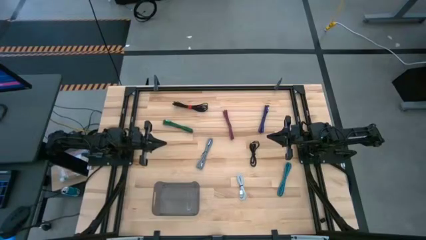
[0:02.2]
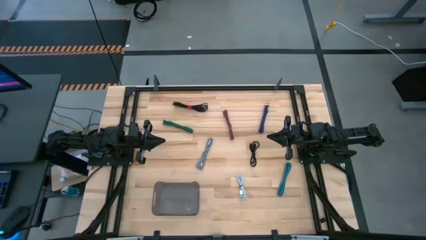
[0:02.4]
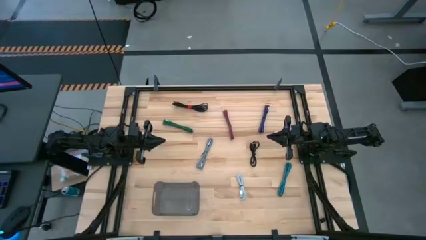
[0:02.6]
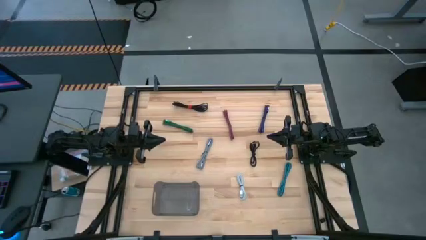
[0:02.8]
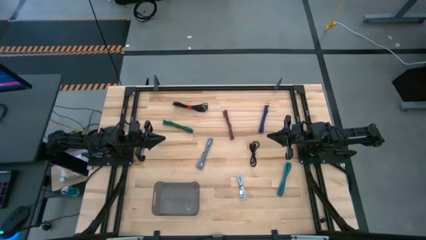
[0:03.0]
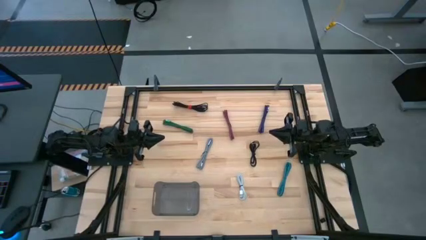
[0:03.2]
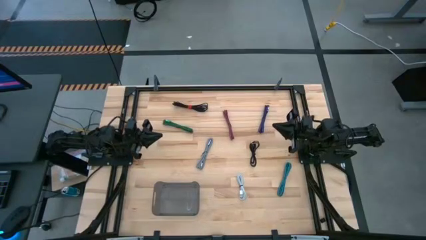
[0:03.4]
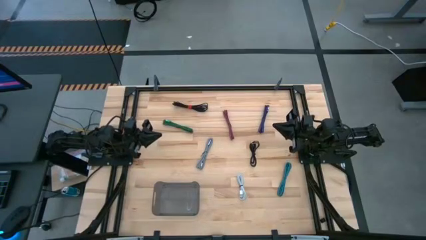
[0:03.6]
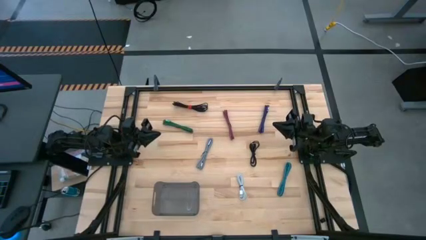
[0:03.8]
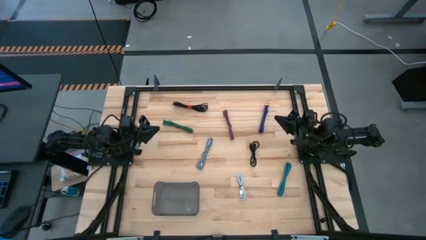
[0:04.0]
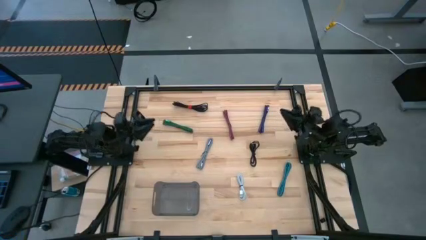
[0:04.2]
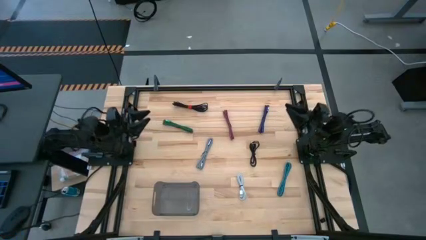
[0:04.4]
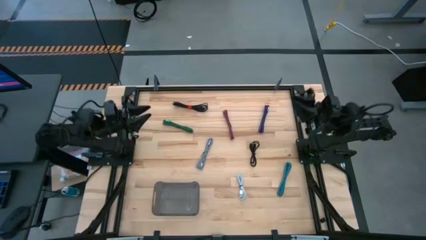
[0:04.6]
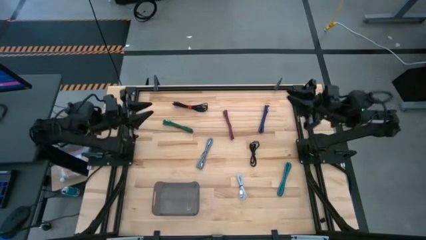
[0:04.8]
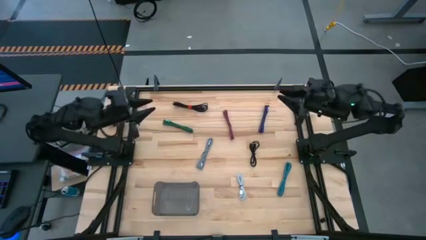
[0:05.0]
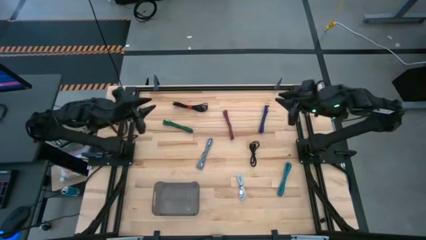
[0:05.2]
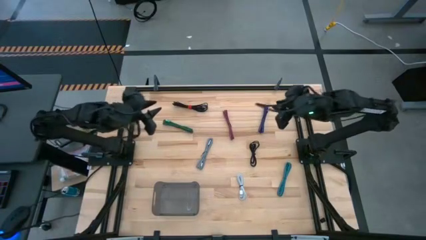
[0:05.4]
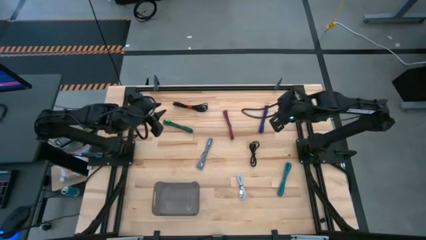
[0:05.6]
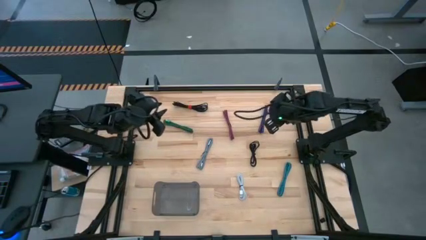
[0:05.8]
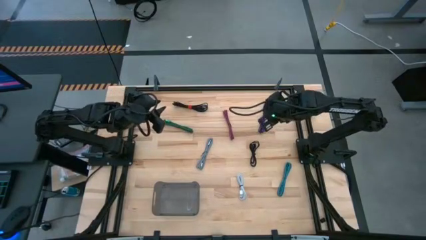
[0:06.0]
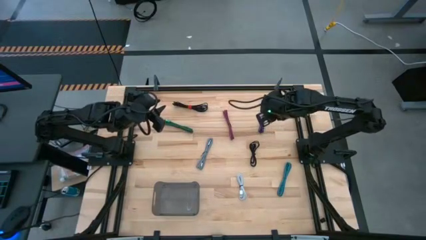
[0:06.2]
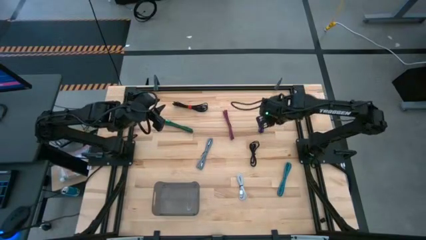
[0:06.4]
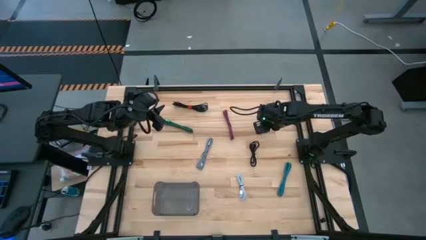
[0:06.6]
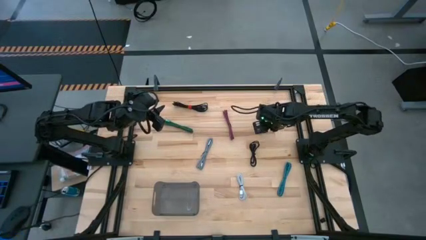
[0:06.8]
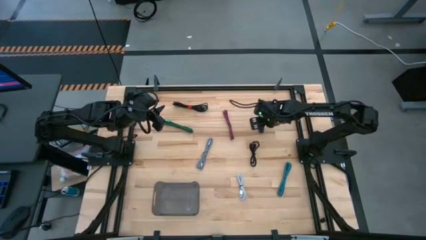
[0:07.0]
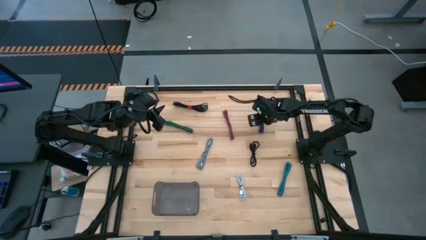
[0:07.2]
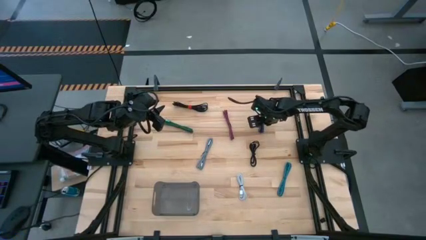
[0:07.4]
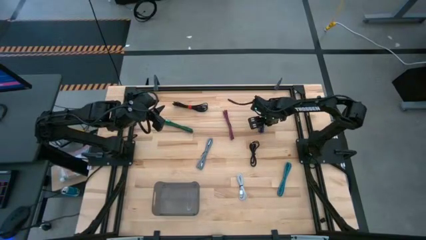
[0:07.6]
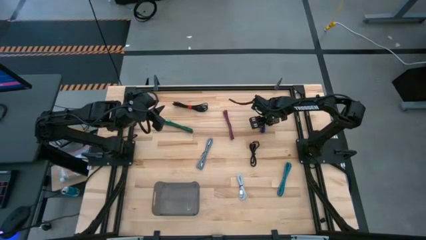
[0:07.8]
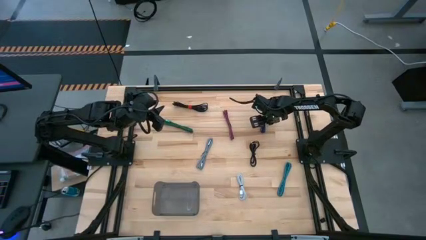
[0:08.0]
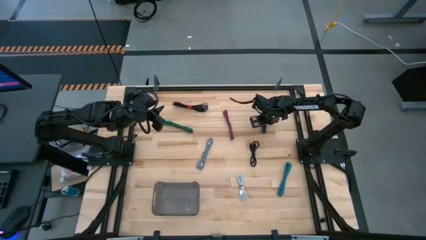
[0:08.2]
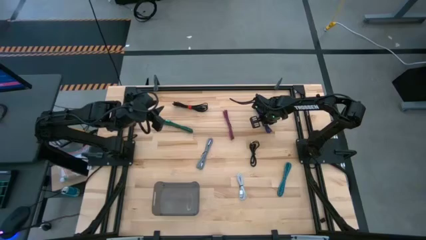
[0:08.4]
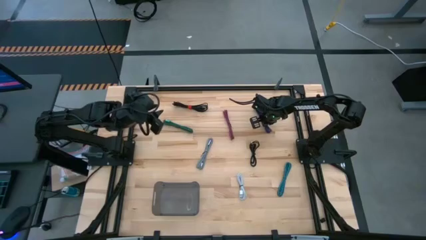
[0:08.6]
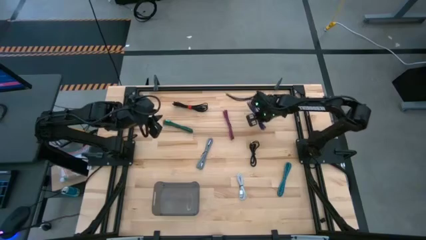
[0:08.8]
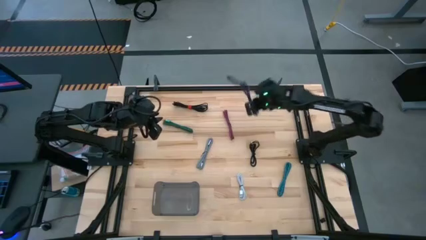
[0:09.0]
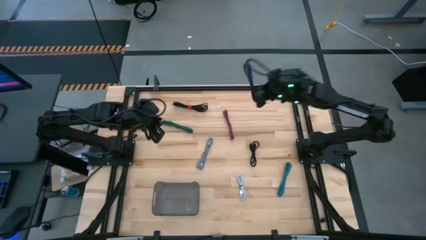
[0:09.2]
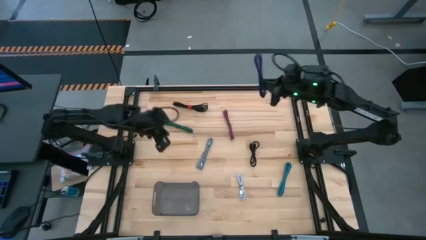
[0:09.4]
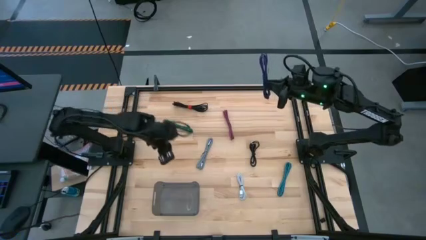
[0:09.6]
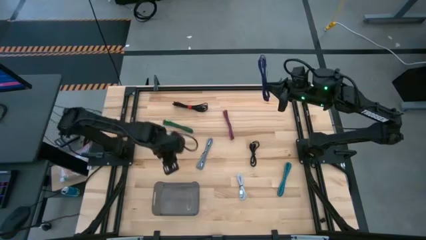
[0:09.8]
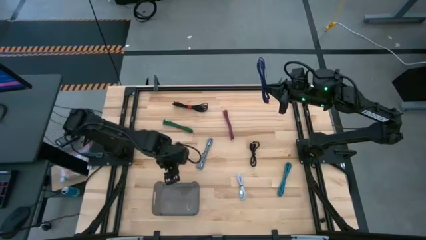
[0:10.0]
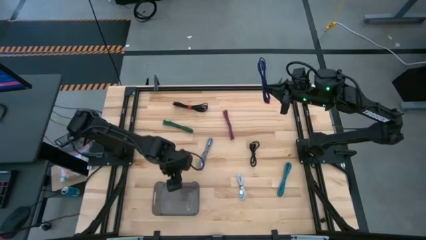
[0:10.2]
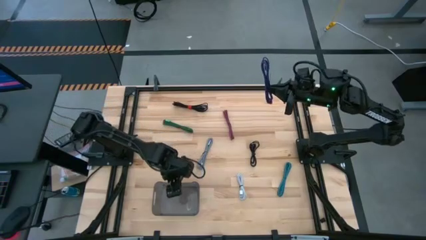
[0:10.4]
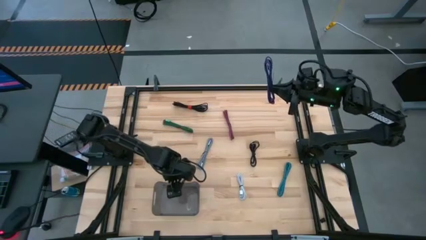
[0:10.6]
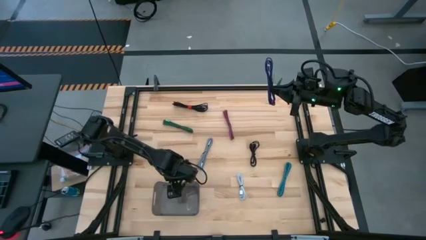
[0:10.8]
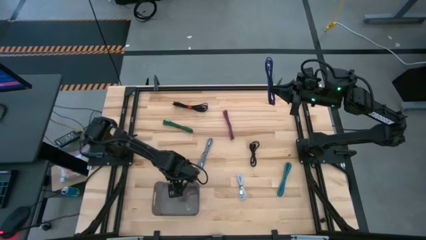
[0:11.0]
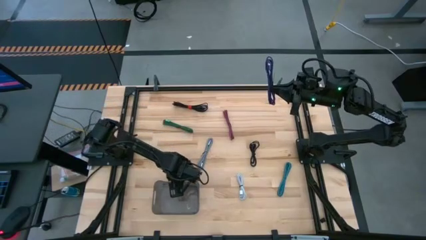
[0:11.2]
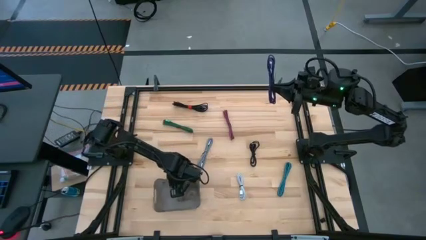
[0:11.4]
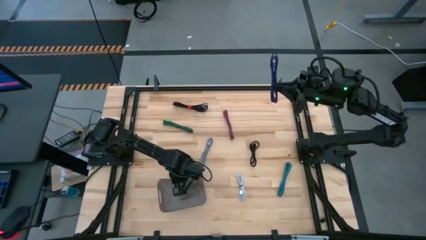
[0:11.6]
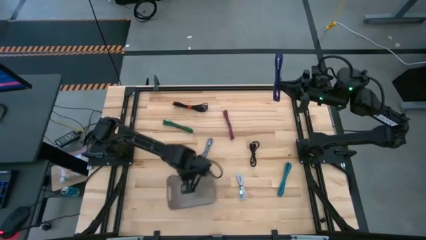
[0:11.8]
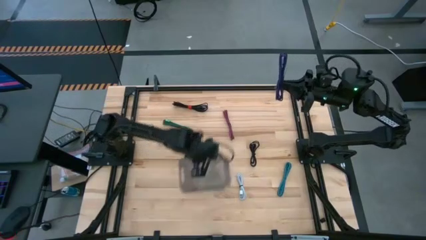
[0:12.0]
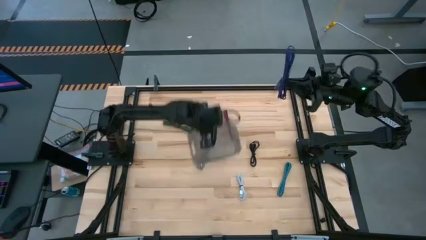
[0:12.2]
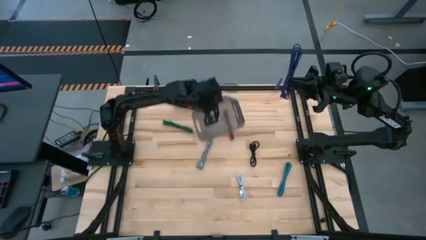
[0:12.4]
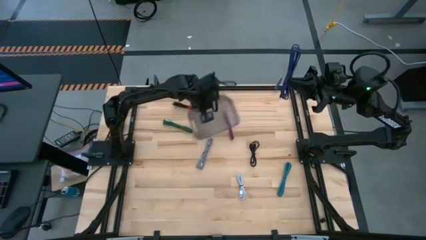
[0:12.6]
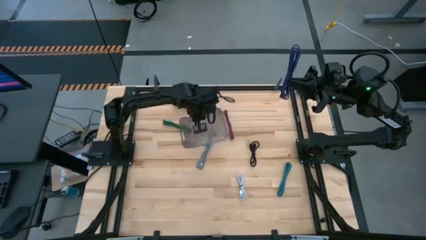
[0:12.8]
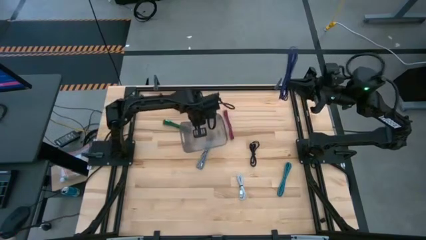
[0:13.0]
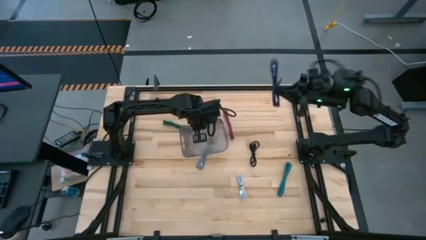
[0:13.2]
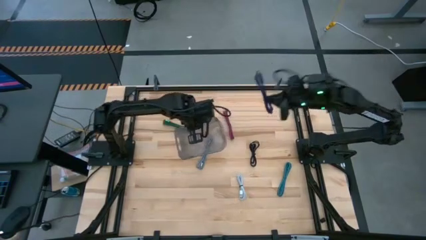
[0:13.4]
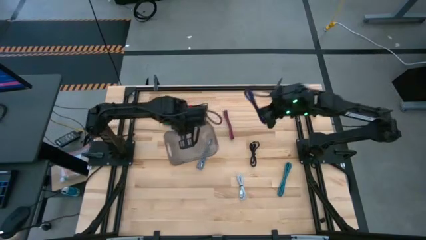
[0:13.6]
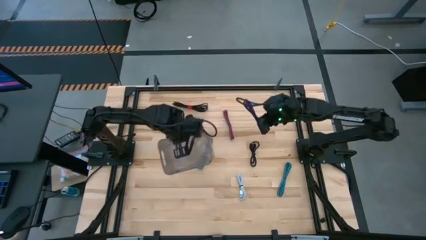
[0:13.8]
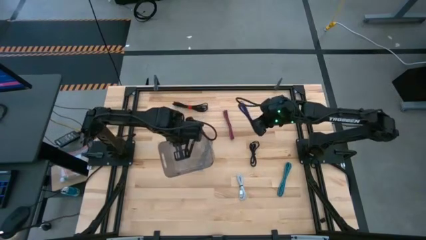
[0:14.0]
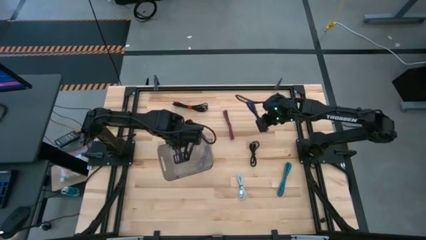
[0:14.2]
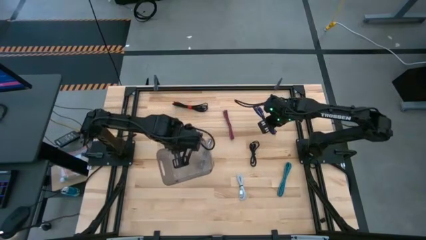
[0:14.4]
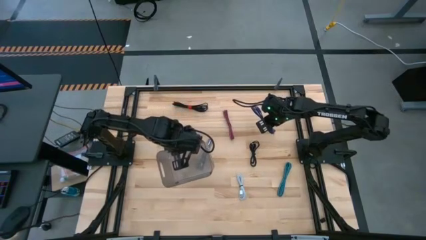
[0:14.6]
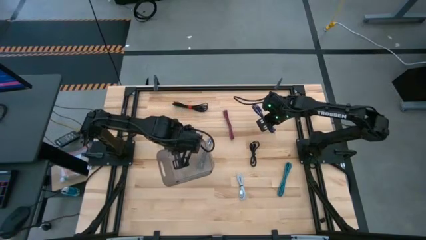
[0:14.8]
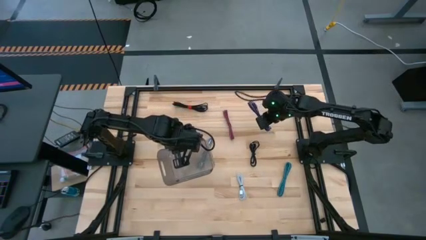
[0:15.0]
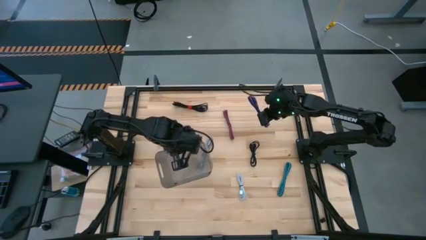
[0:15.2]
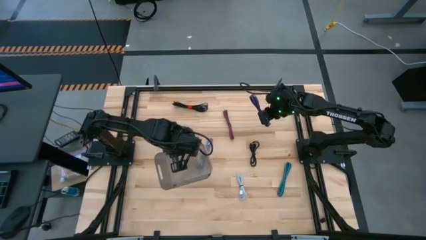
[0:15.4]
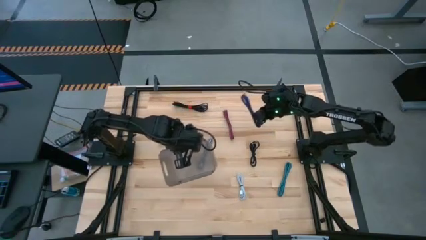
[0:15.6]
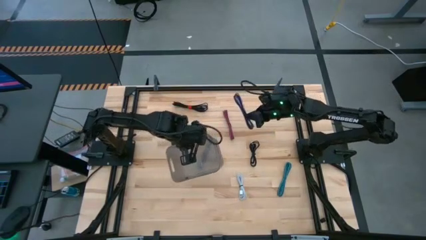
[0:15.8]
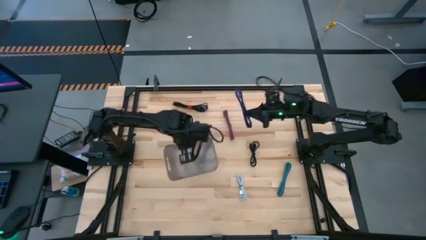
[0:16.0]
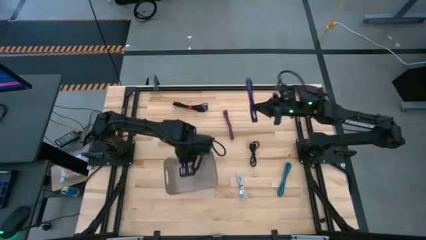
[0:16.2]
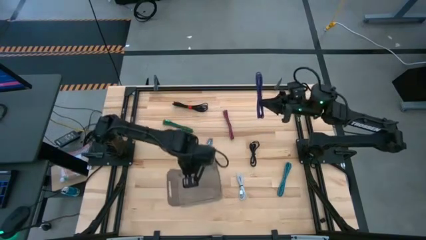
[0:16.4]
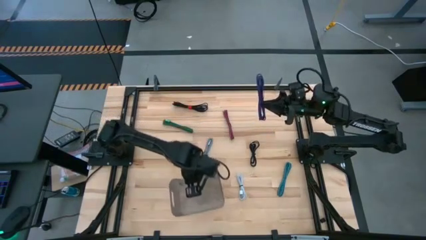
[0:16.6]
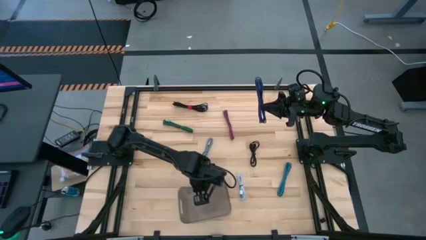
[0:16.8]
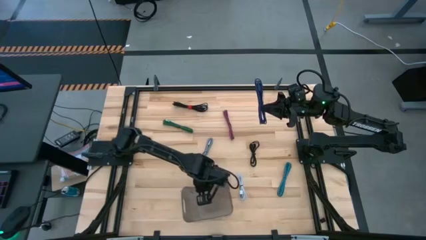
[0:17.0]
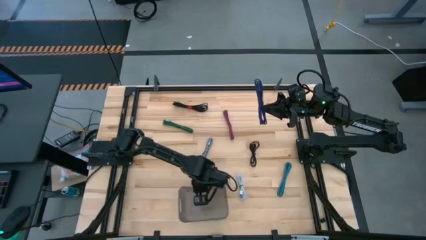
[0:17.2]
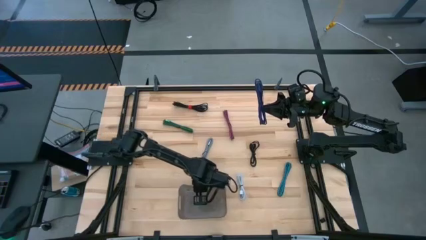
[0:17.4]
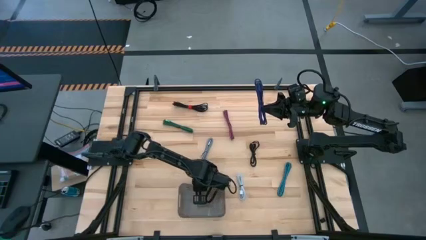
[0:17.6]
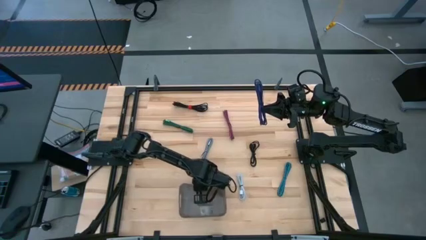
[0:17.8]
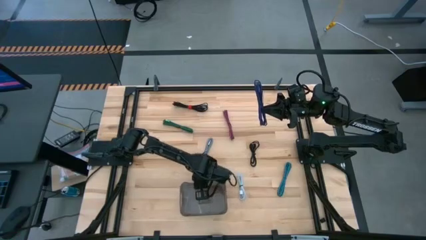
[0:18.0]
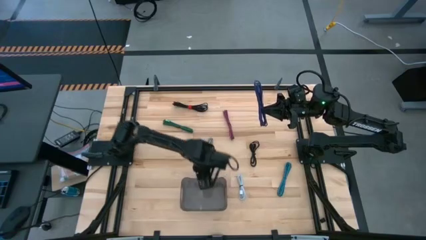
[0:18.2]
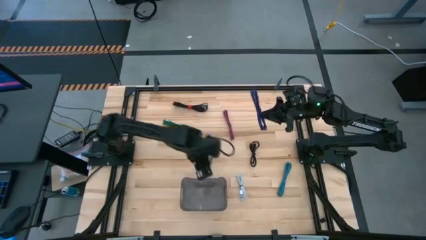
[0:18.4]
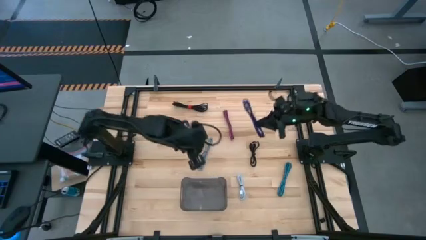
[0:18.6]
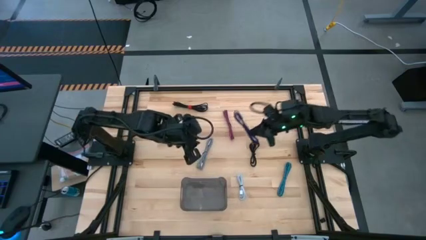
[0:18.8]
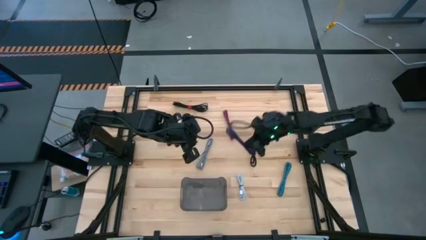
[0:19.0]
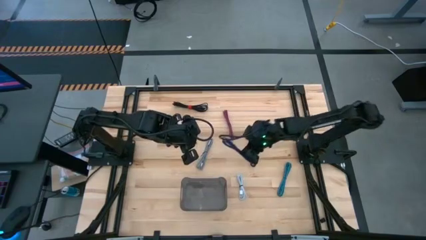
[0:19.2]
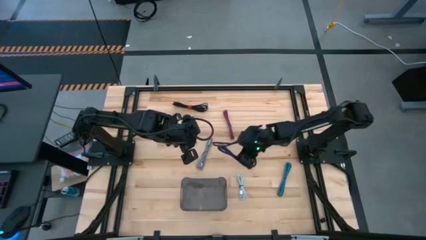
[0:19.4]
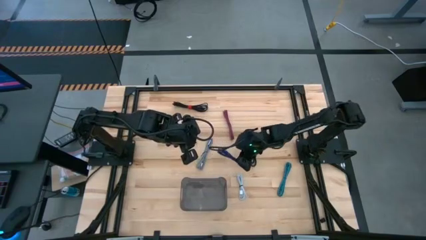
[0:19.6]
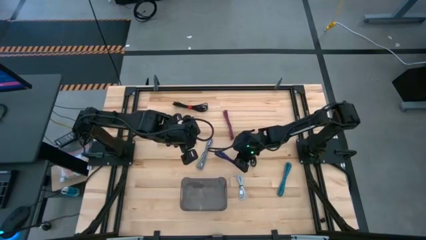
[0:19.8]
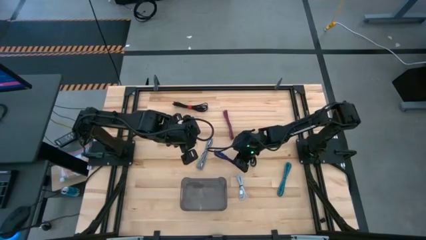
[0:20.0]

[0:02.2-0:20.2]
Task: Pick and place USB-C Cables
Put the violet charger cable into the black bin
